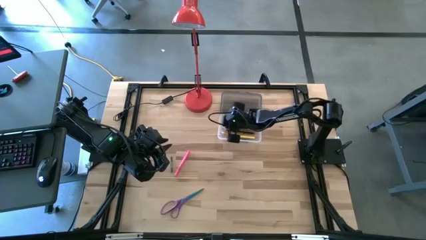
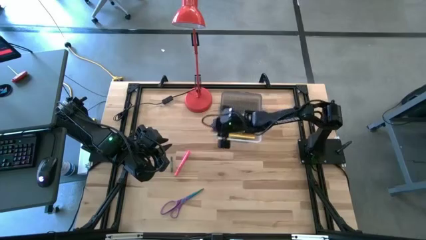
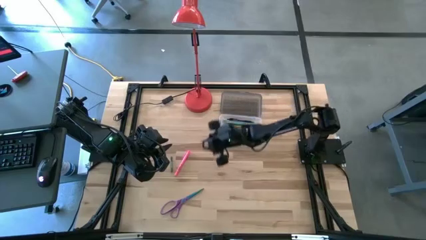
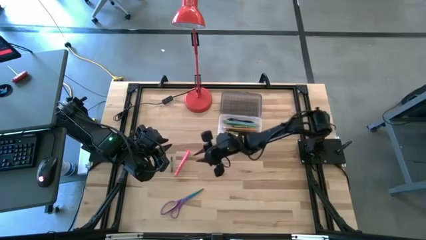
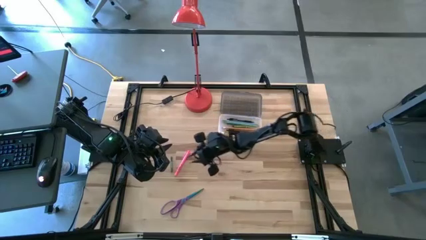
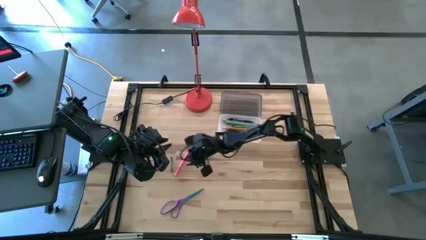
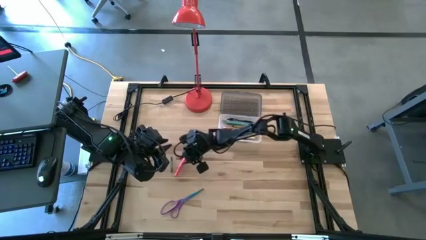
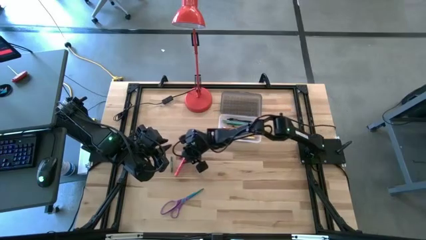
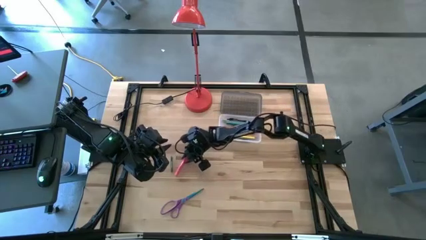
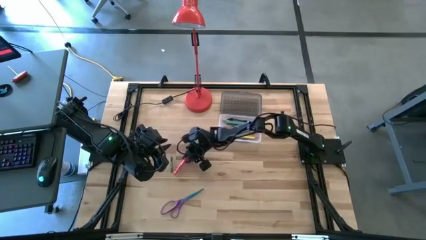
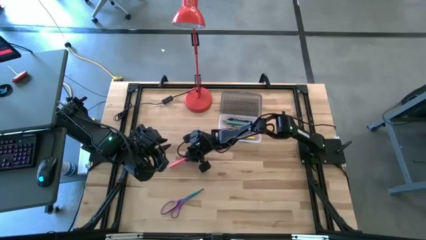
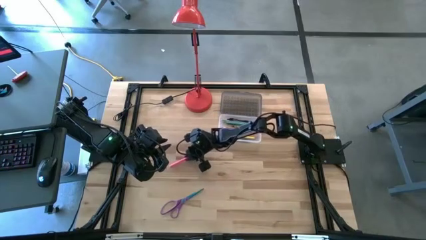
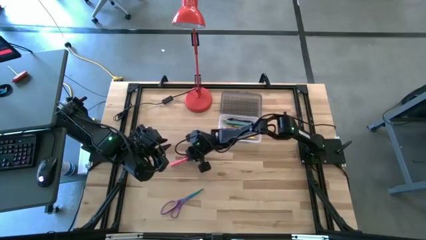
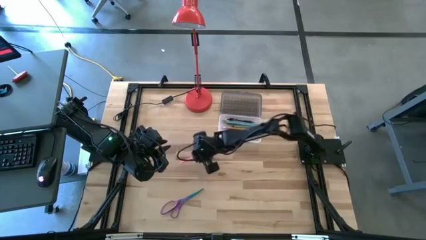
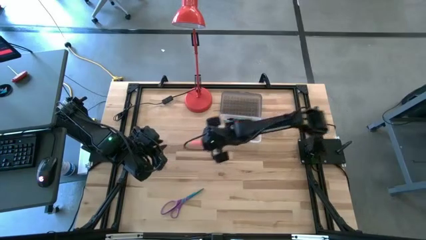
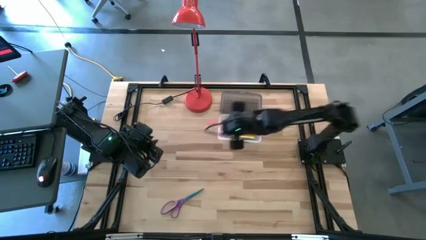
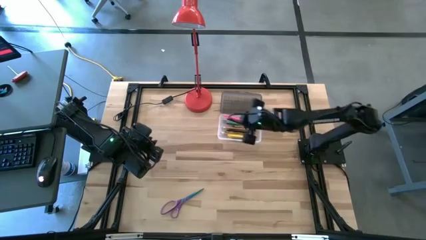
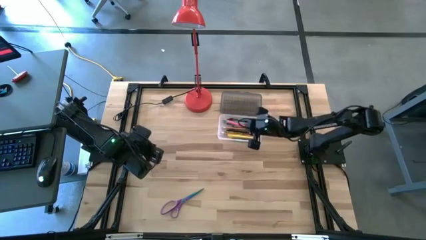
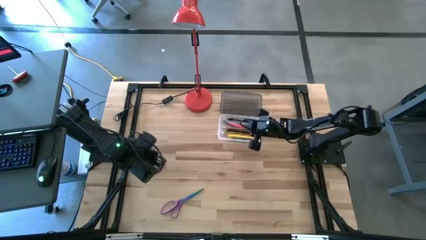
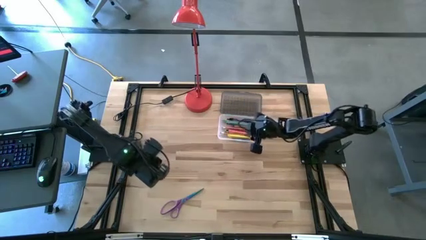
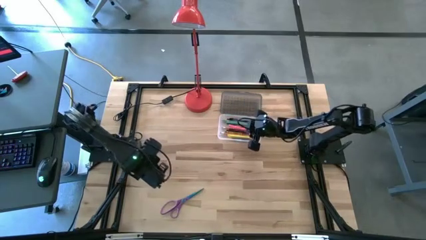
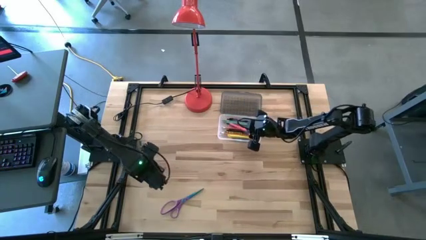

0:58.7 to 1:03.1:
Task: Pick & place school supplies into a supply box
Put the pink pen into the black supply box

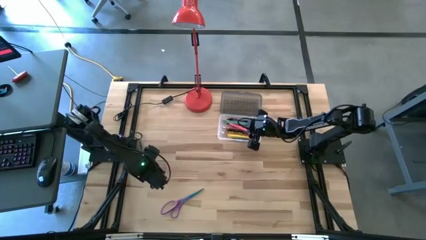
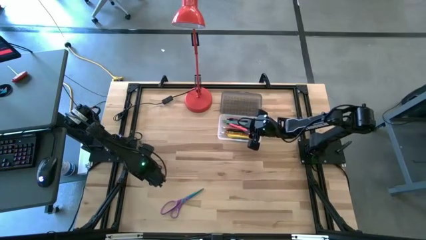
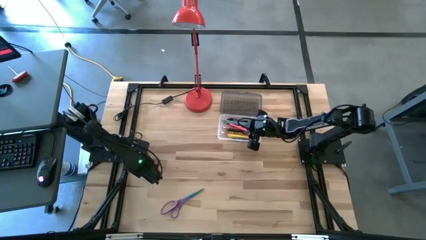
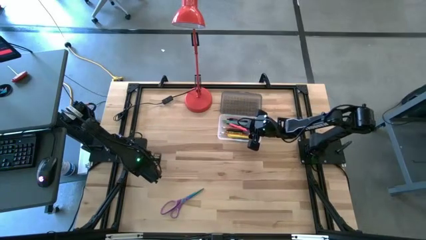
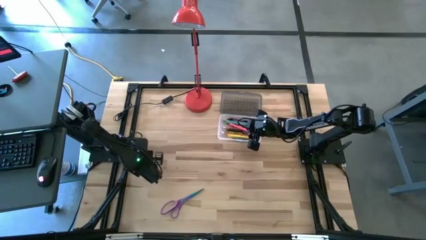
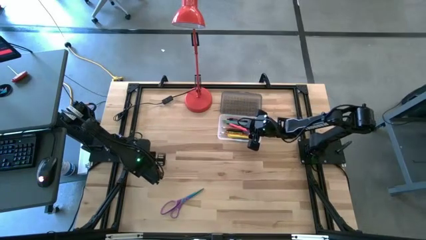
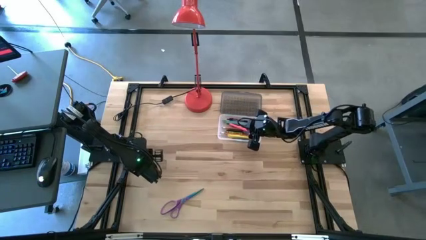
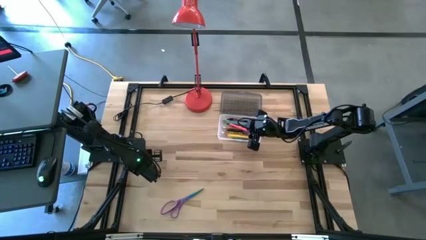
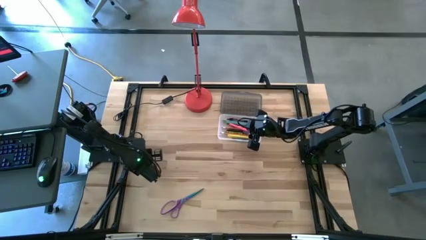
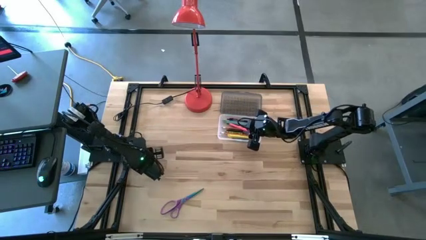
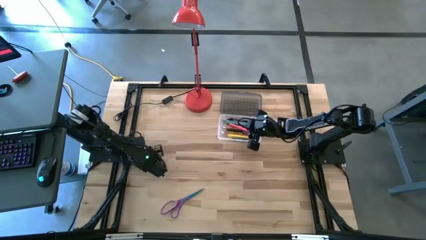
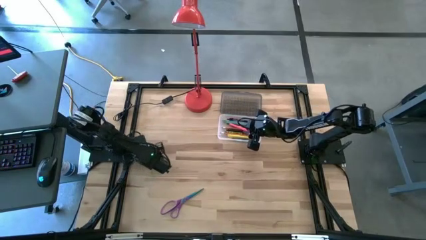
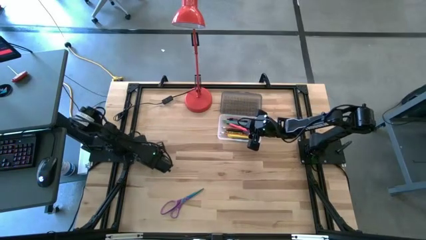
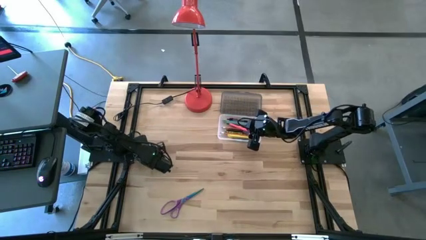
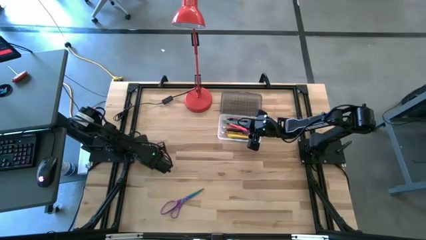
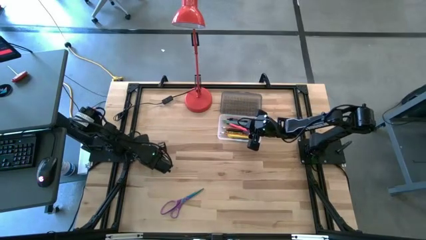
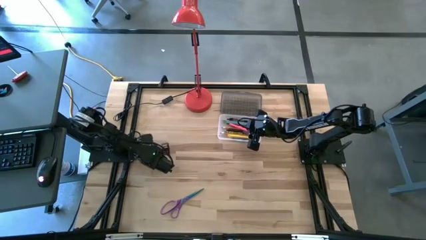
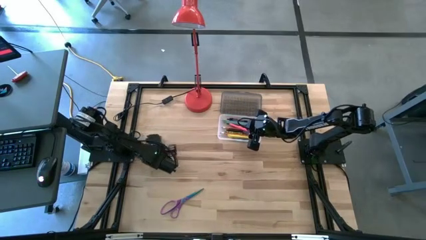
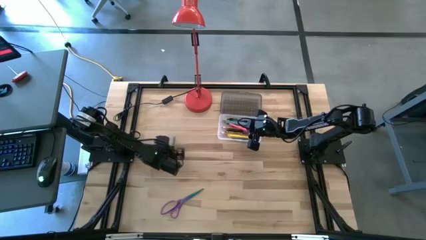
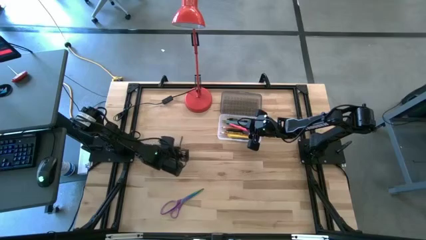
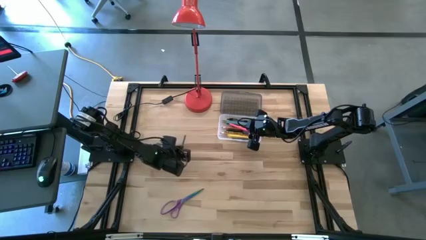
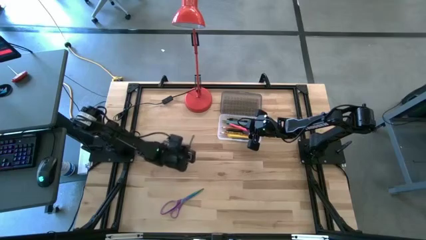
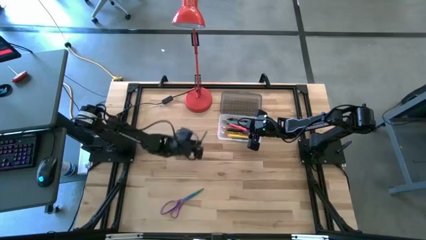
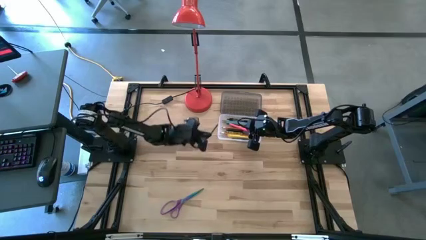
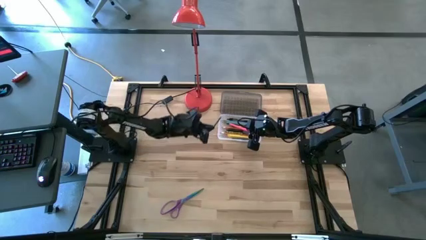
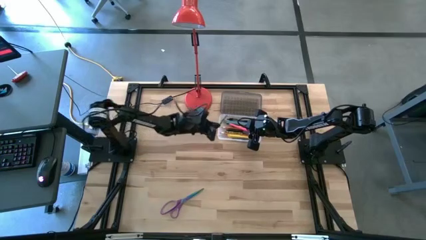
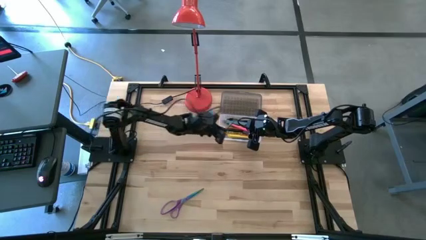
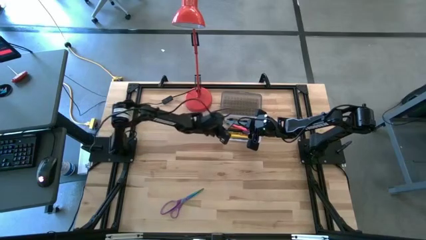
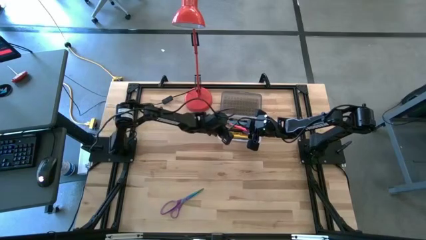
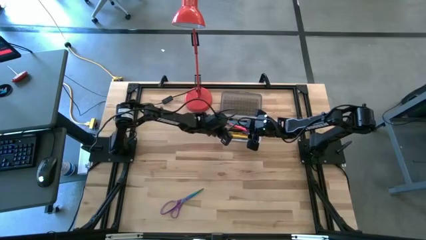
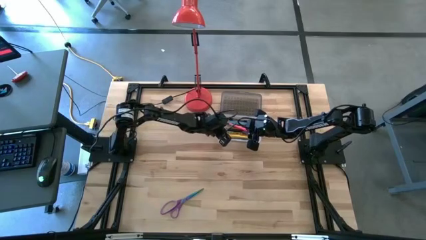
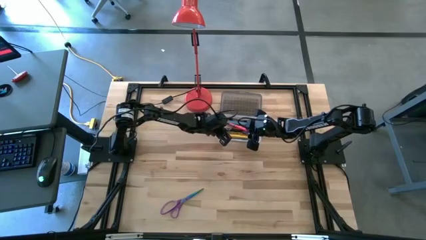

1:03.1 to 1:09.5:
Put the dark green crayon into the black supply box

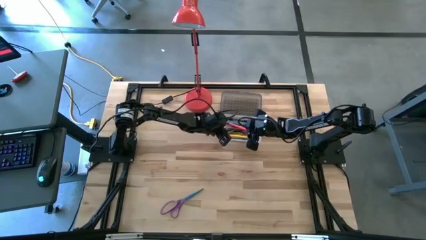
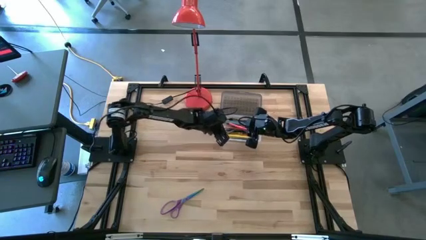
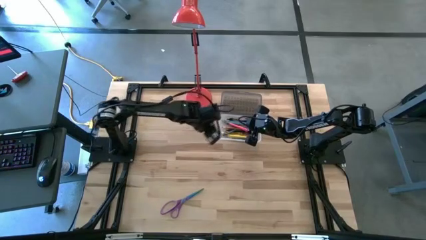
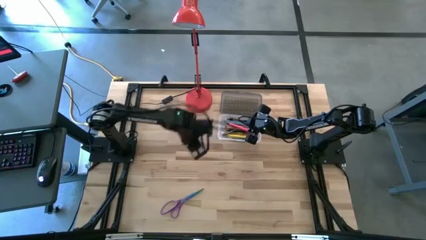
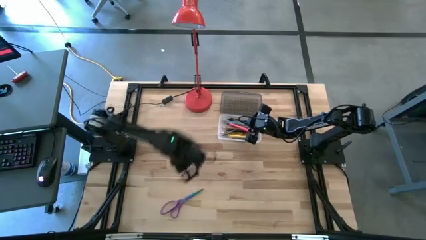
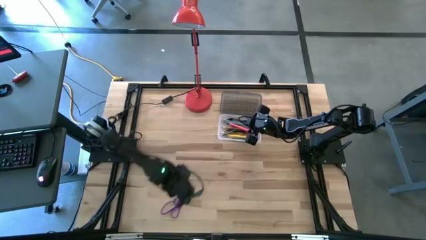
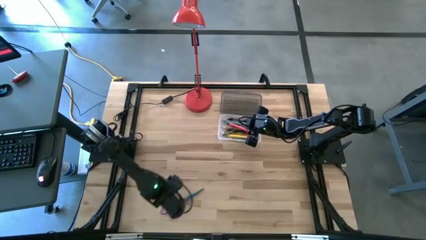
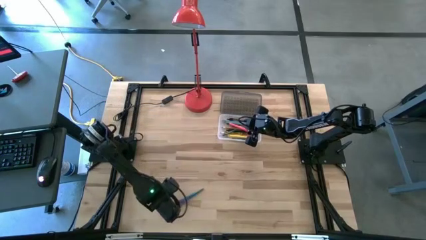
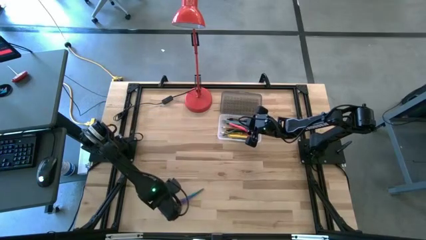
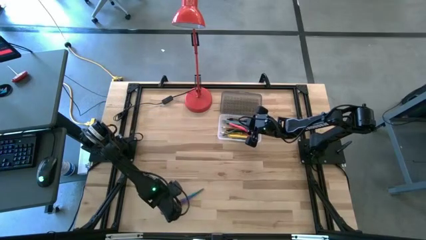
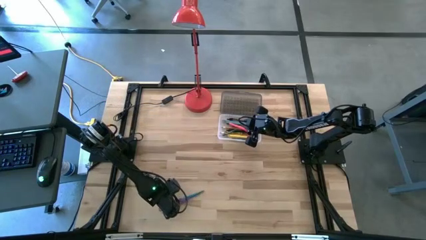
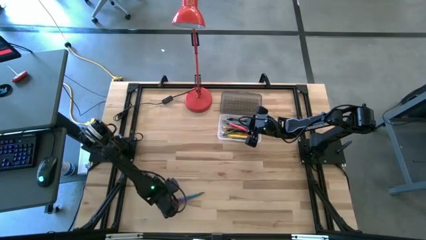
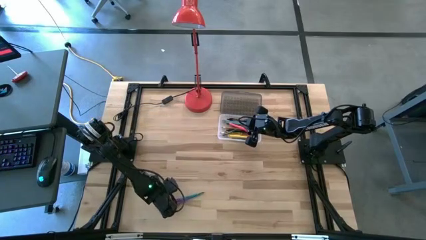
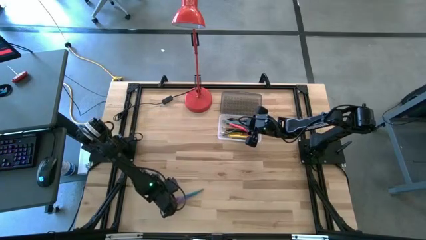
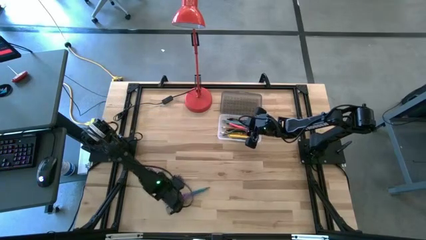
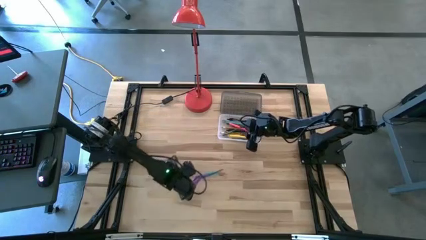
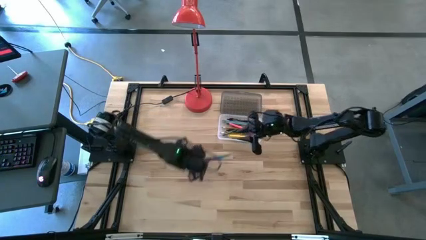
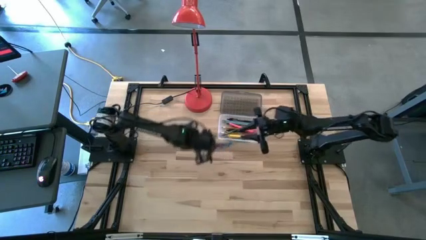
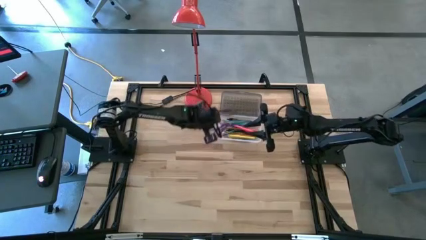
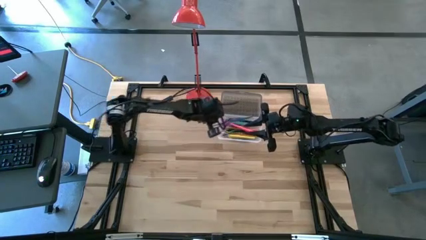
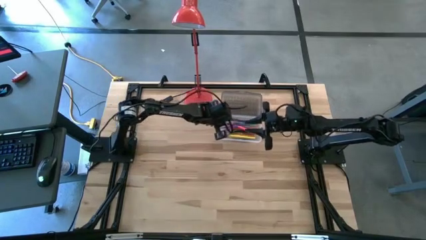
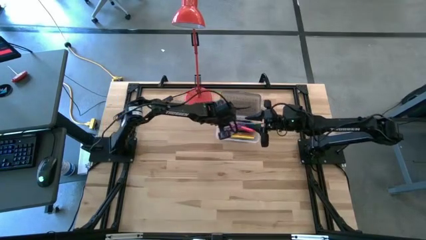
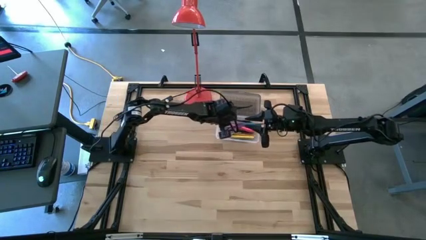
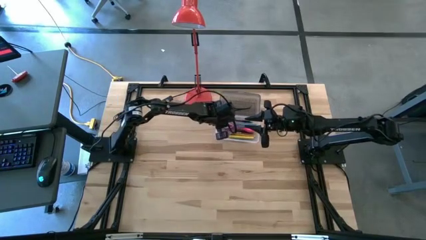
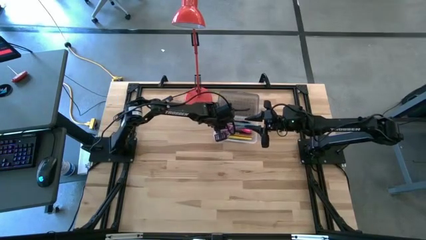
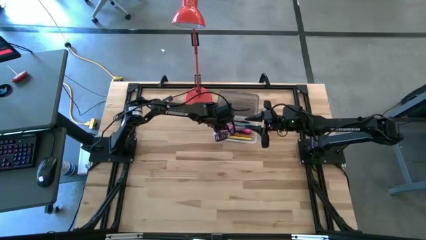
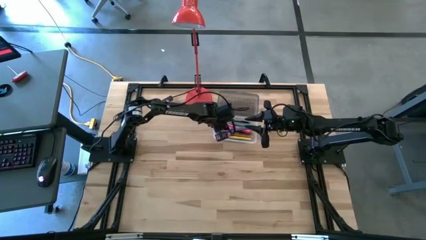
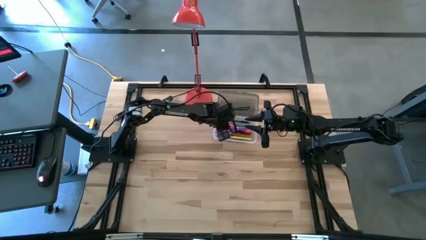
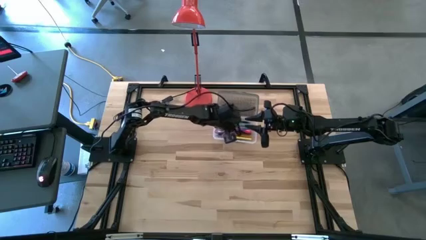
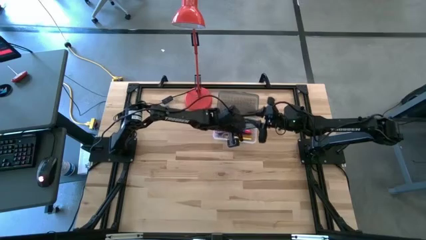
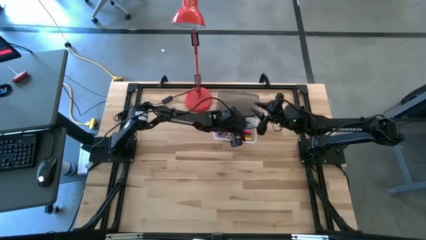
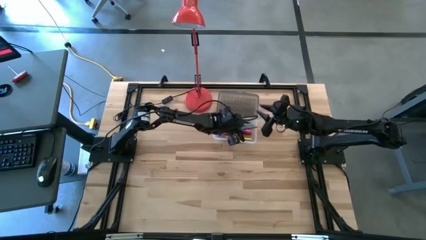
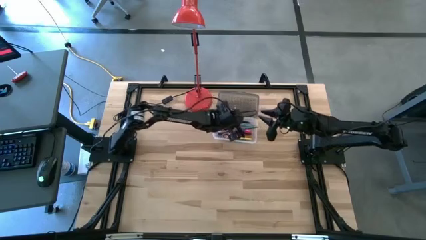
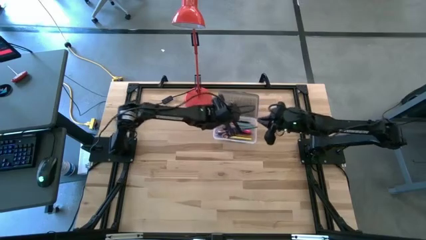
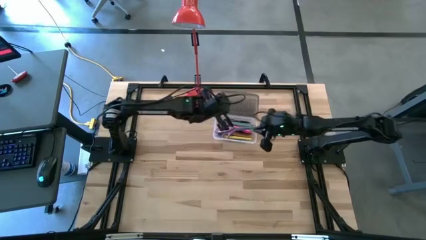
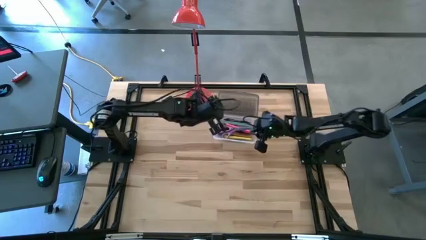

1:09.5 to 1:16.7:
Put the purple scissors into the black supply box

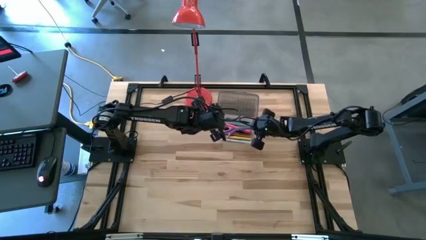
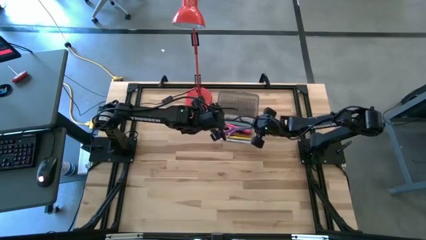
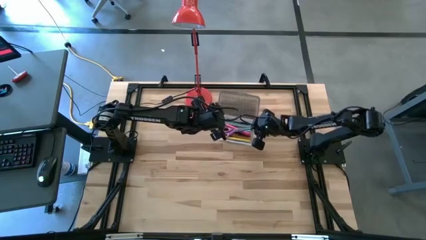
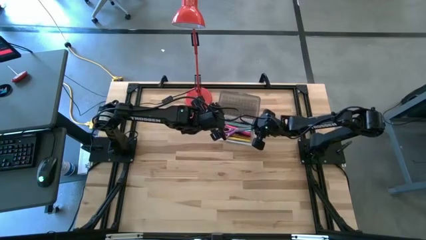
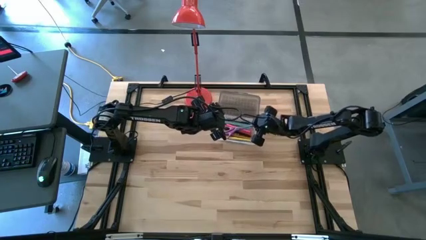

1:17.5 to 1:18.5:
Put the purple scissors into the black supply box
